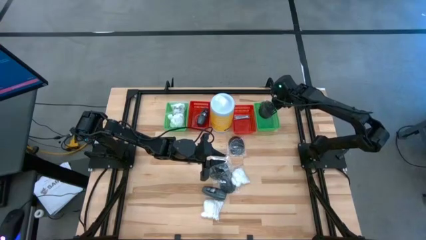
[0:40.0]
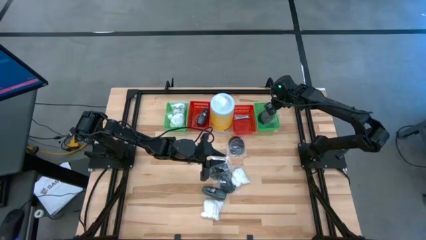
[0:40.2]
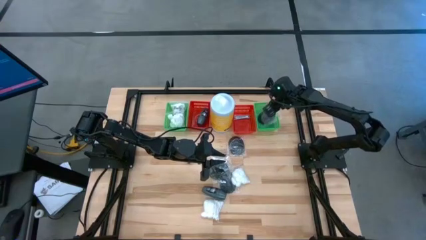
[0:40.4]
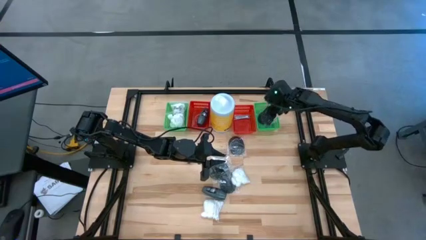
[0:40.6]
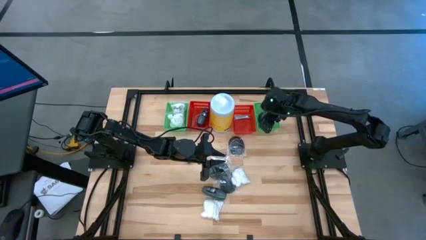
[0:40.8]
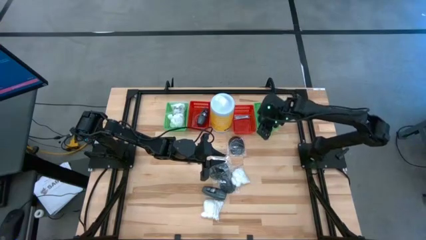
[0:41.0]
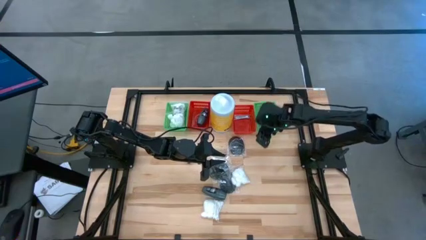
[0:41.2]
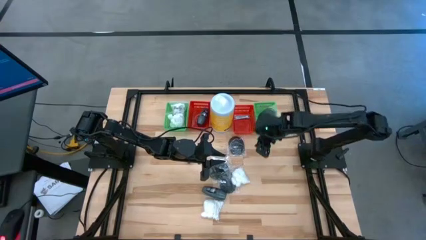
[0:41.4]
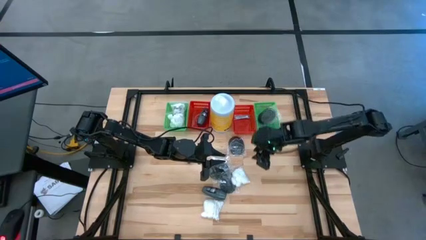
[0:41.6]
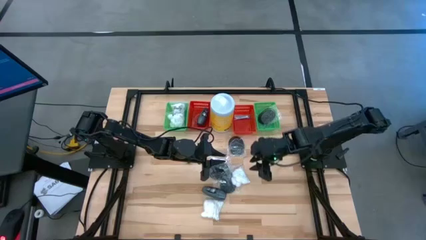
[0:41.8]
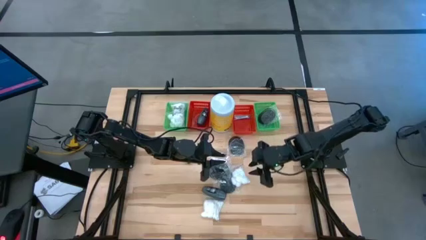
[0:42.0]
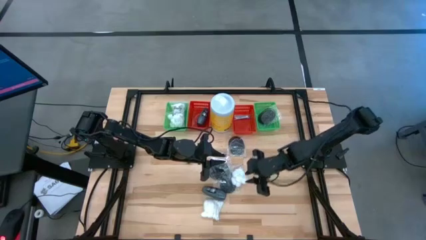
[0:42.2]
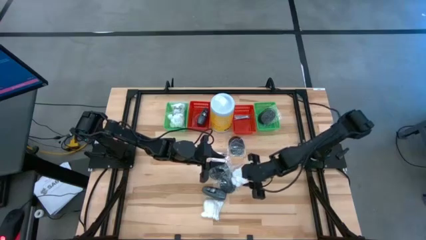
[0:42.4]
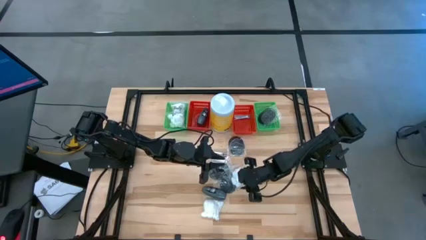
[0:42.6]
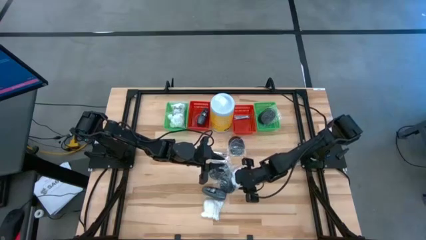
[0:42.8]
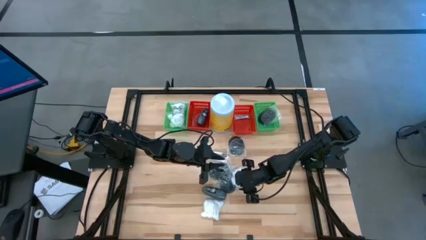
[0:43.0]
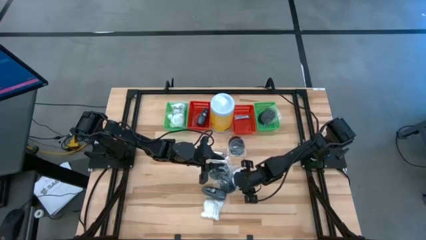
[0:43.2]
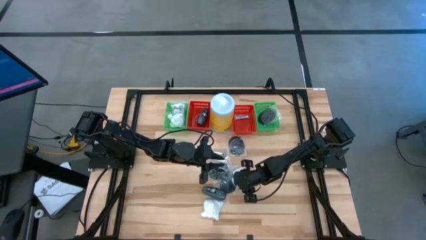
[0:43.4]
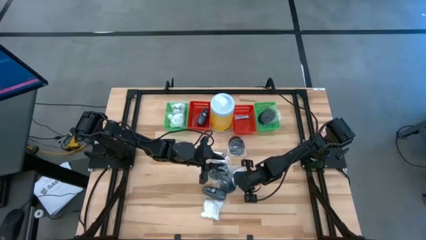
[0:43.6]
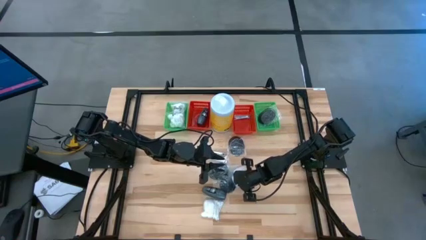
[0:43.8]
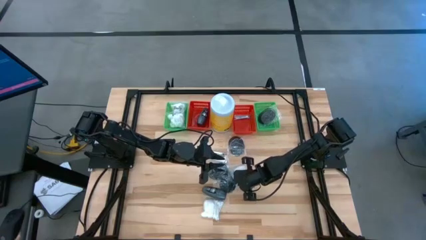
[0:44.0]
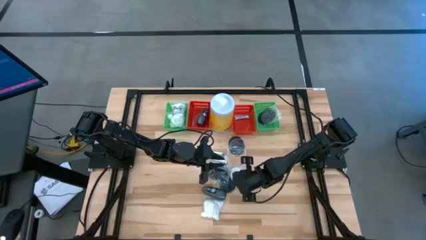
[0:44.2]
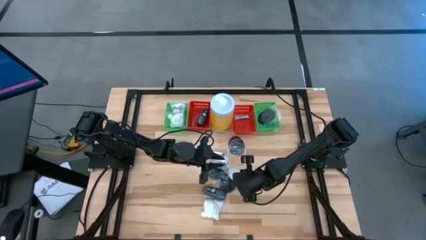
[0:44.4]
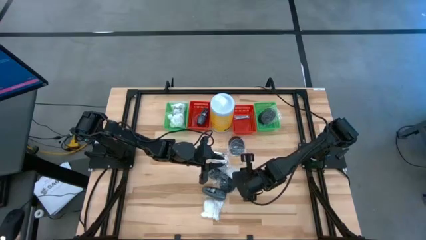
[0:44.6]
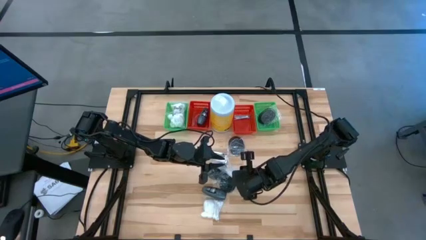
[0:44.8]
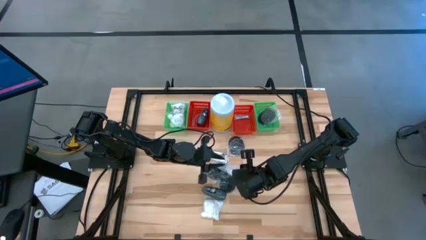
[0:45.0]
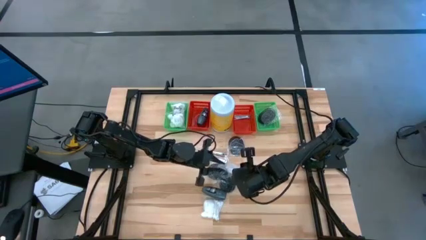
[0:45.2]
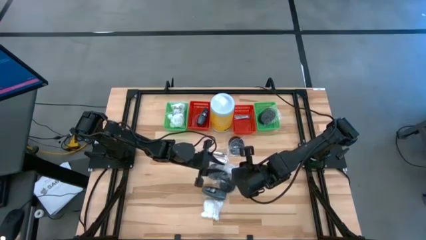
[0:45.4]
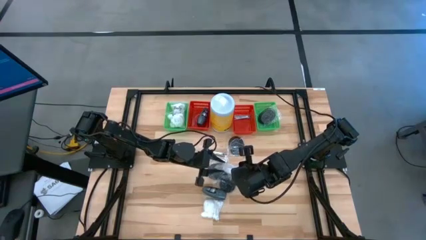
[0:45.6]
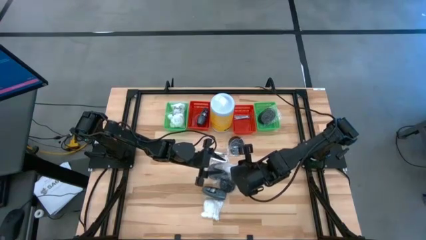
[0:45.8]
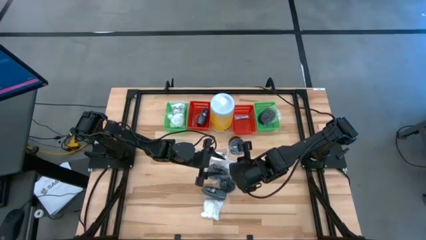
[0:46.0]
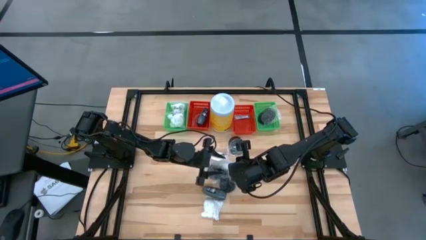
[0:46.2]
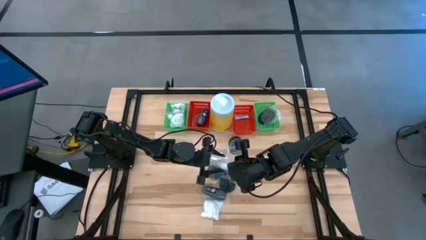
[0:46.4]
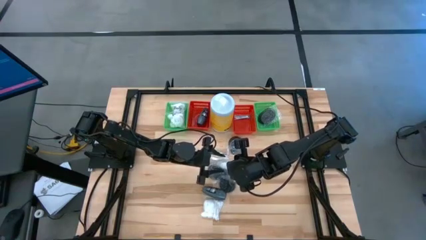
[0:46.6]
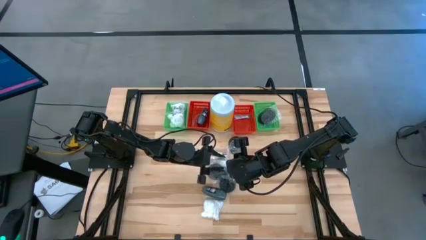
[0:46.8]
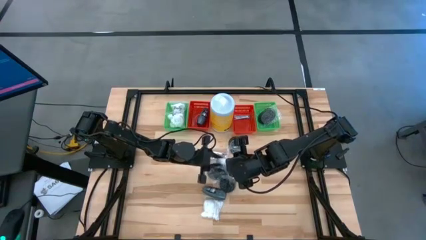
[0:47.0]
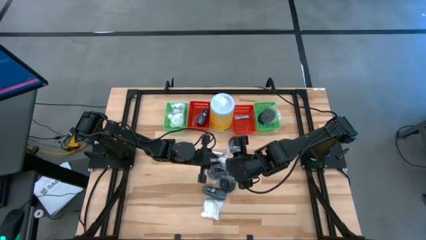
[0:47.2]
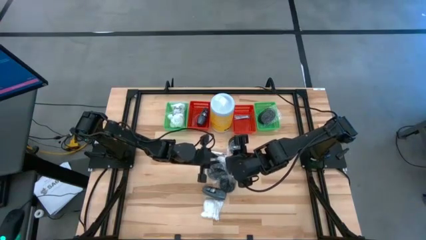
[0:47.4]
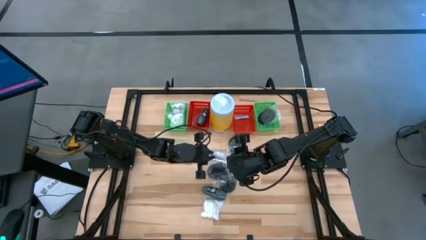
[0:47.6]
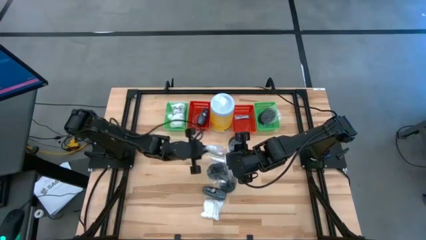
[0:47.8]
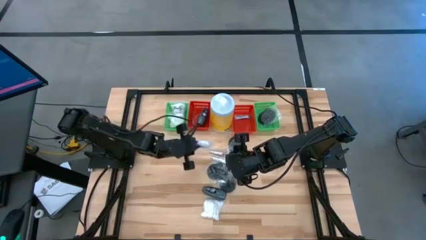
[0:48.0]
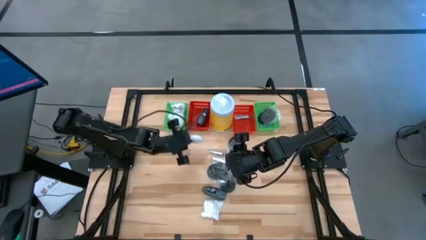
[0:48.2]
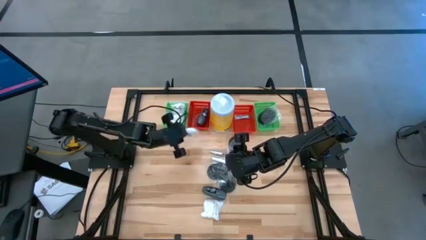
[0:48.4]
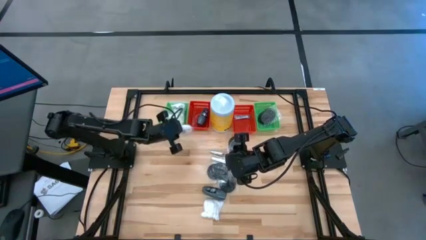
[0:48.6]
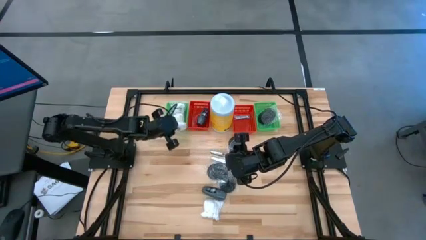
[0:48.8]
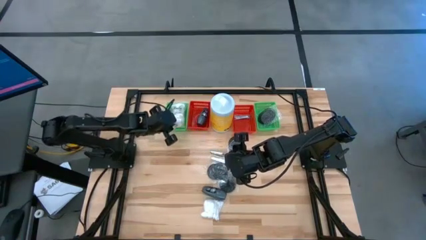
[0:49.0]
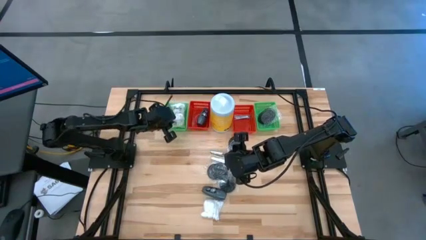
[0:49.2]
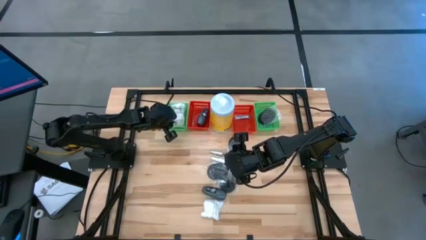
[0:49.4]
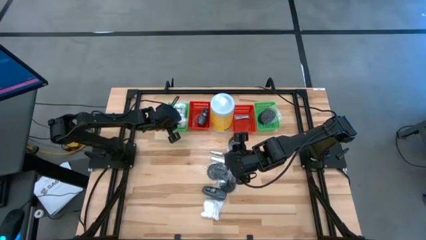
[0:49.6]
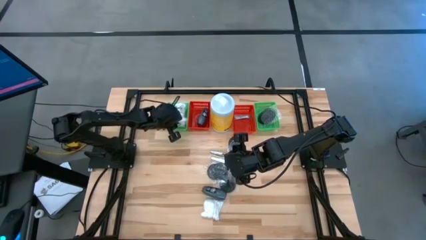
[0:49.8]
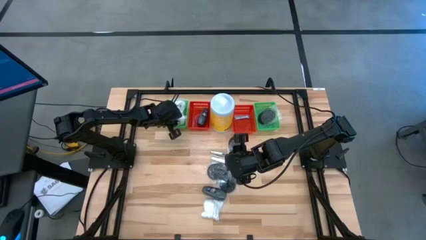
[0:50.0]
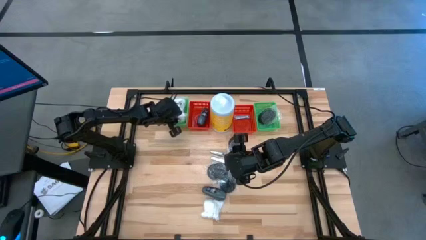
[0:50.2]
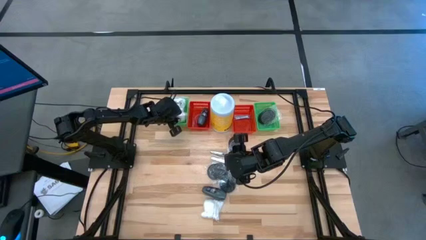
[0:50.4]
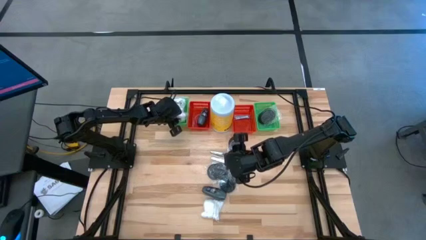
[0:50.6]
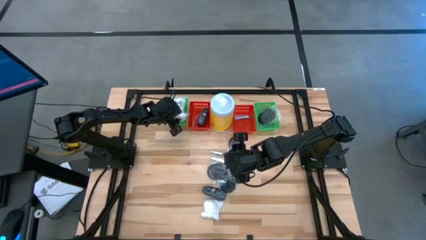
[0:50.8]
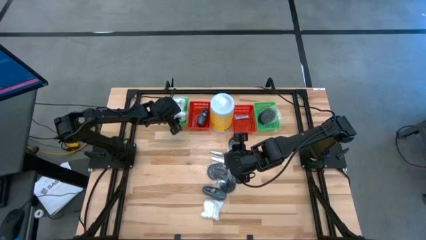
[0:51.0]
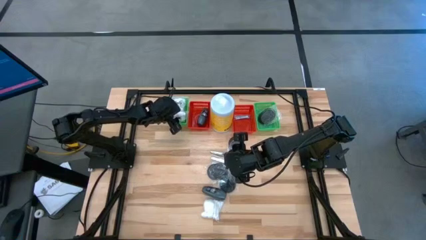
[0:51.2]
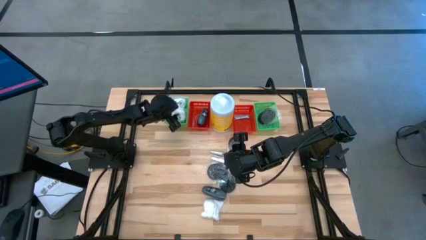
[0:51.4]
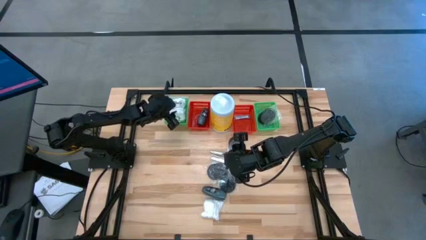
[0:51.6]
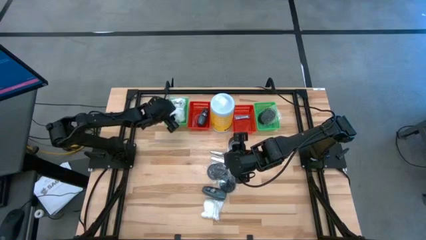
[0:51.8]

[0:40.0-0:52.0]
Task: Pick & Place Travel size toiletries
Put the white cotton pack into the left green bin

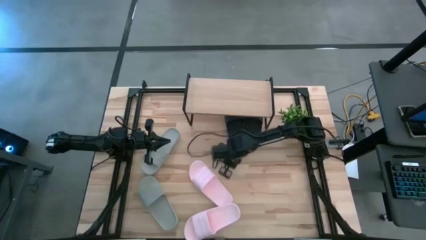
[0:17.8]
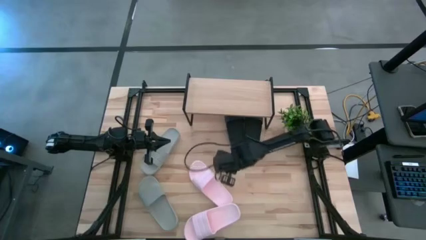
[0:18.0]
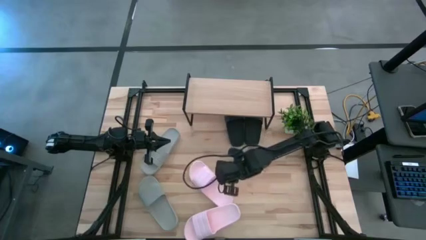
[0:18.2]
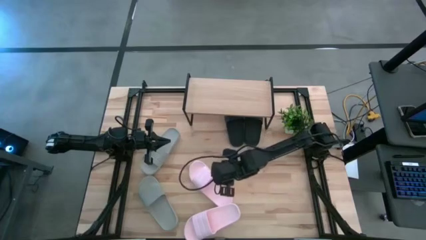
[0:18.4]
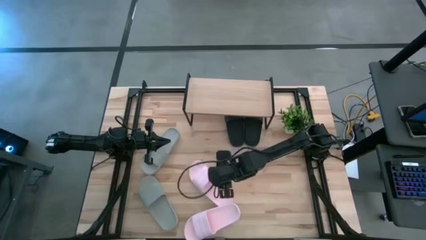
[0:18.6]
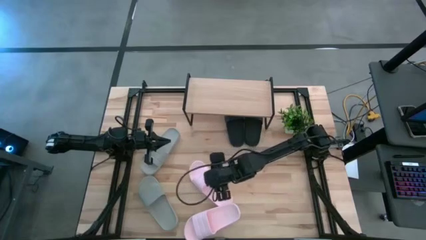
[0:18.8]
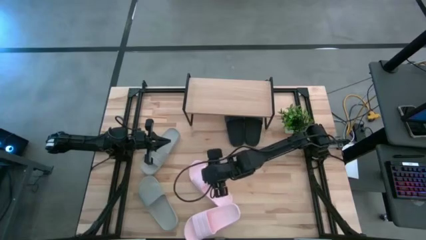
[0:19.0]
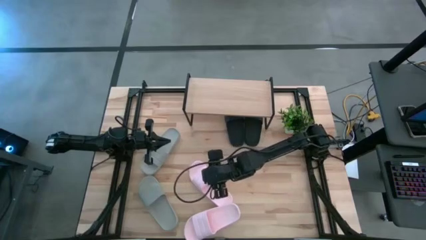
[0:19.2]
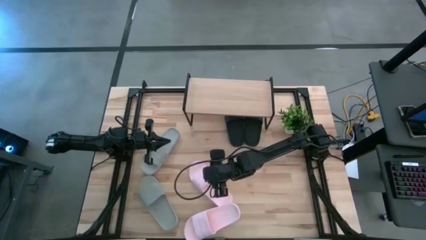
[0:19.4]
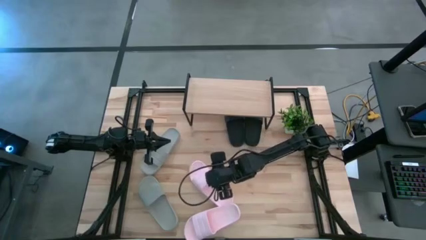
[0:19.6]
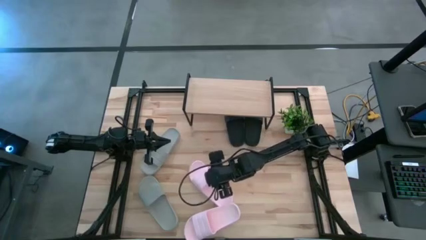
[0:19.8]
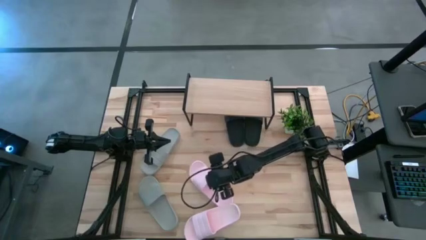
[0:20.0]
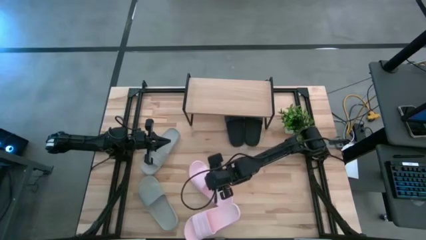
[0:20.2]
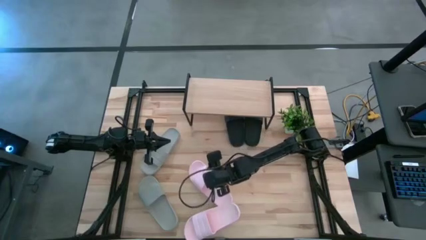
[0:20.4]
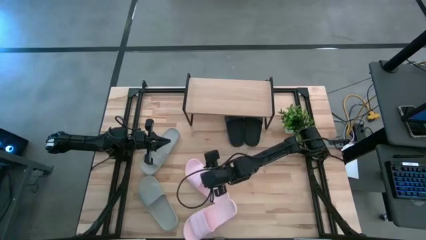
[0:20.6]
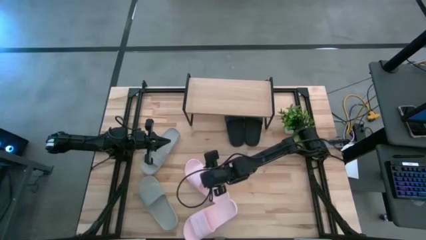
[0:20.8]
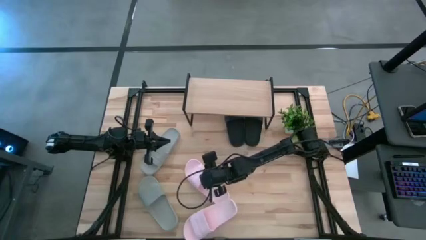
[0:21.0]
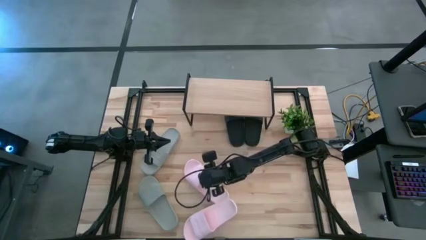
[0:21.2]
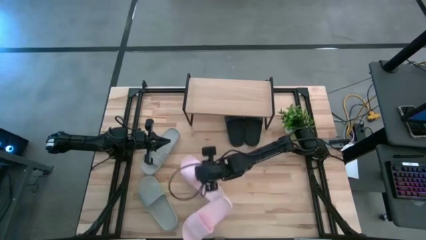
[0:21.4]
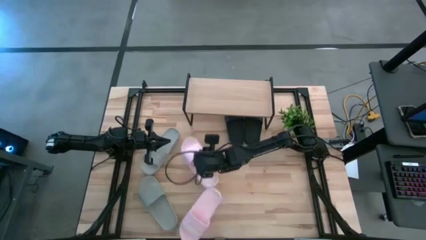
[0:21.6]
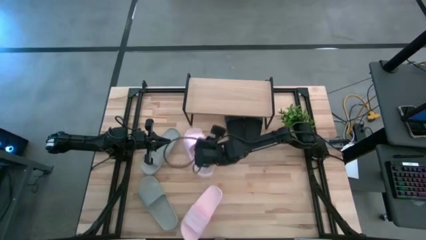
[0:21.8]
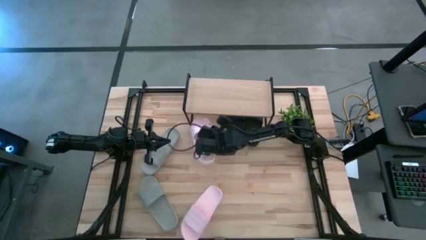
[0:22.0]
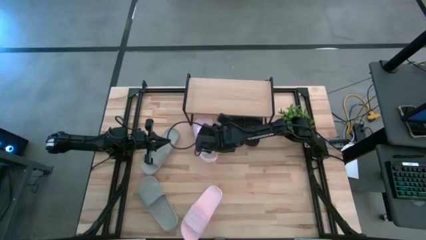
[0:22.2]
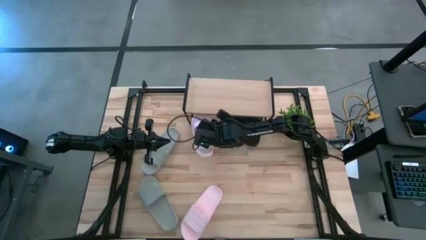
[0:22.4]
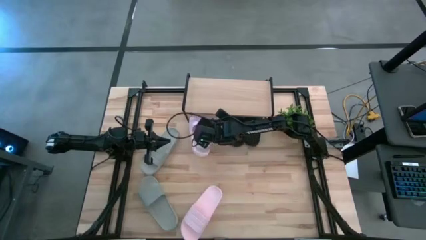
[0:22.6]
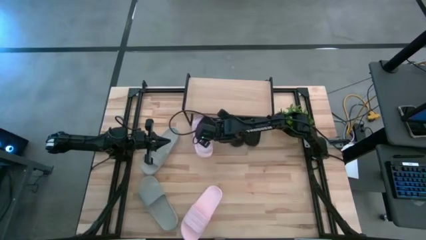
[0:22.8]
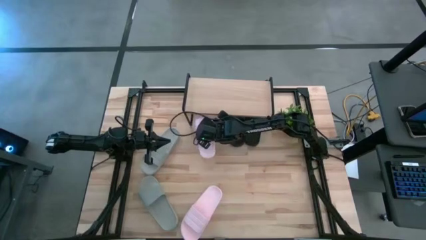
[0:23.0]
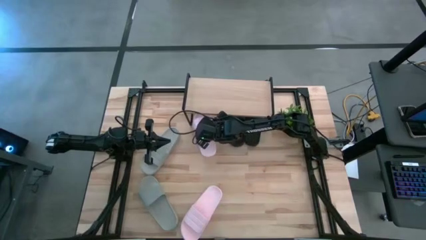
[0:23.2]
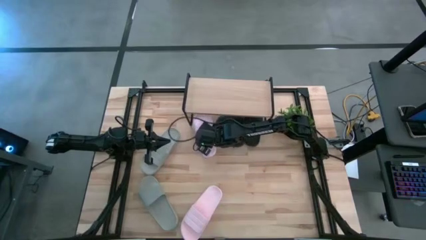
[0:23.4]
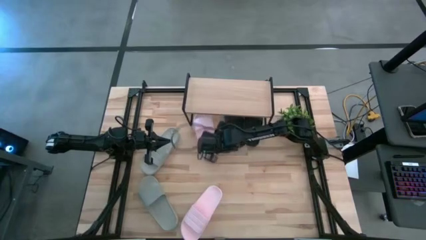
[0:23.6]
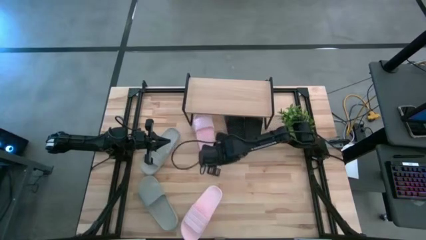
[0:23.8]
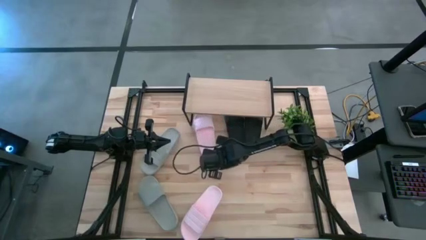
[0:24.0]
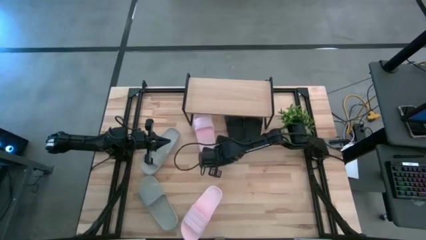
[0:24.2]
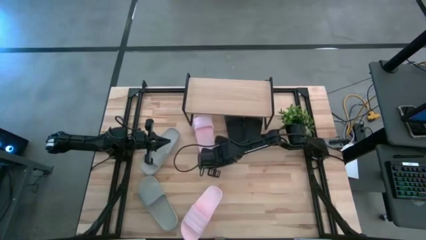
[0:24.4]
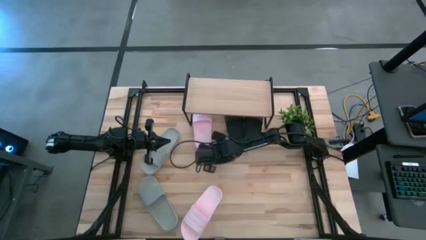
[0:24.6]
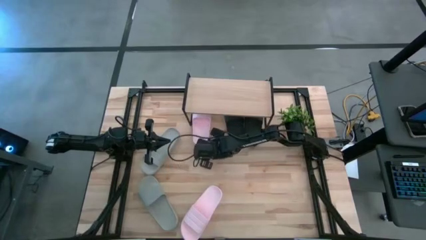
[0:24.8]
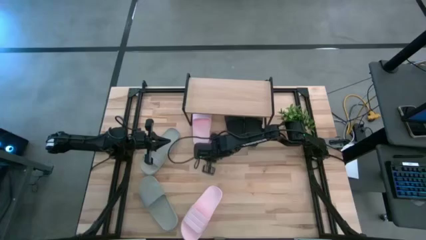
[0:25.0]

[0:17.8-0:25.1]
Task: Pick and place slides into the shelf
Put the left pink slide under the shelf
